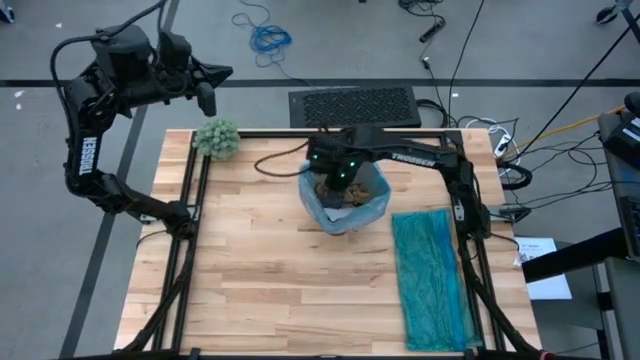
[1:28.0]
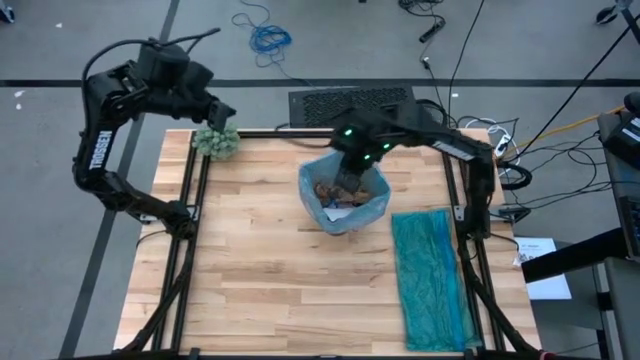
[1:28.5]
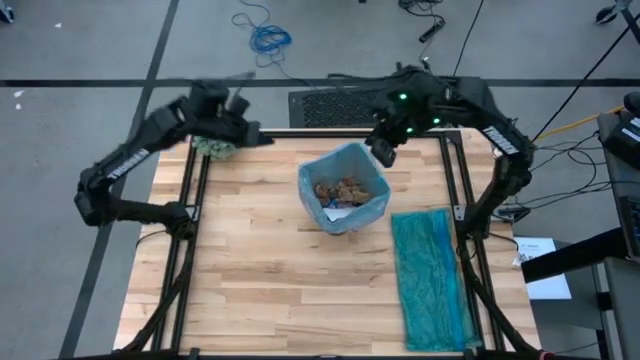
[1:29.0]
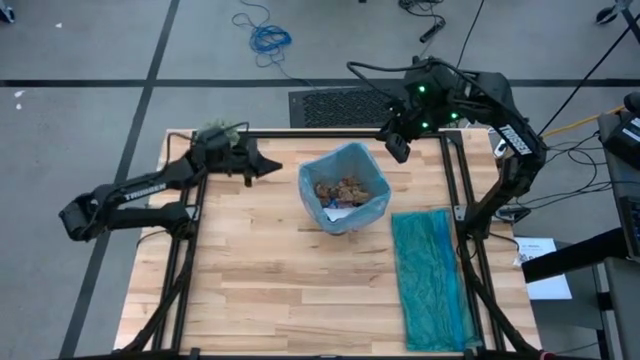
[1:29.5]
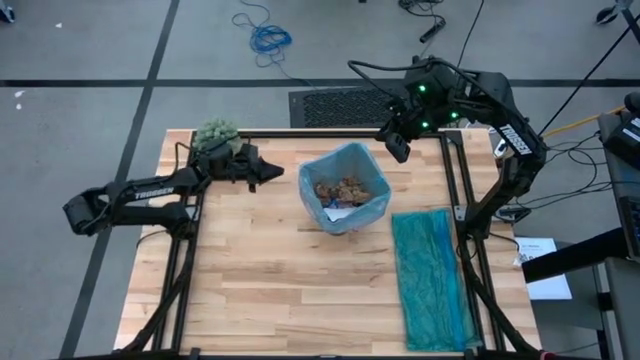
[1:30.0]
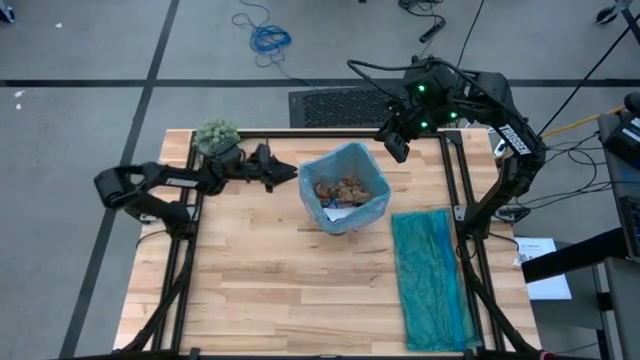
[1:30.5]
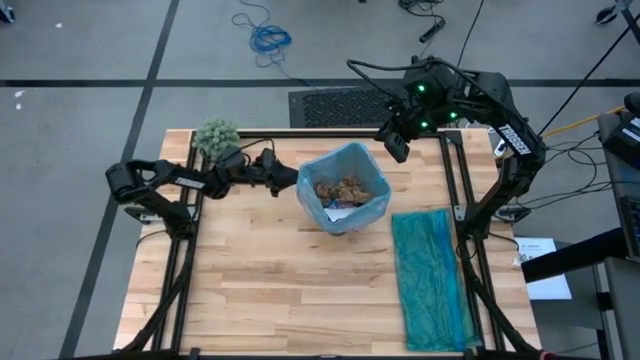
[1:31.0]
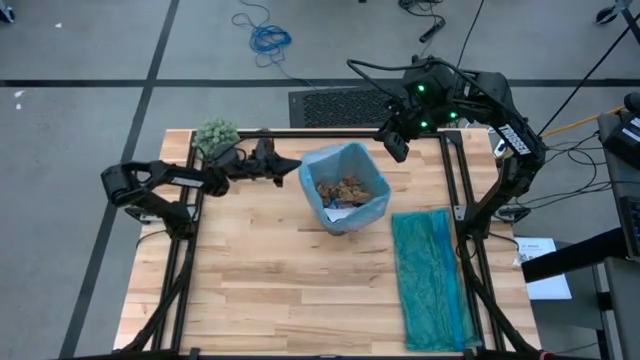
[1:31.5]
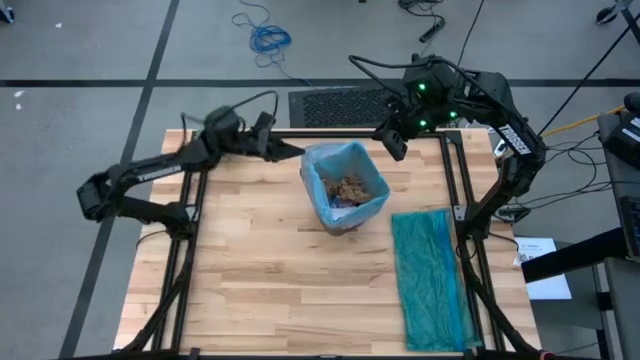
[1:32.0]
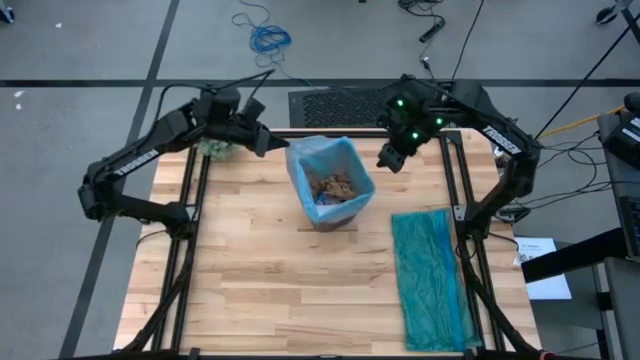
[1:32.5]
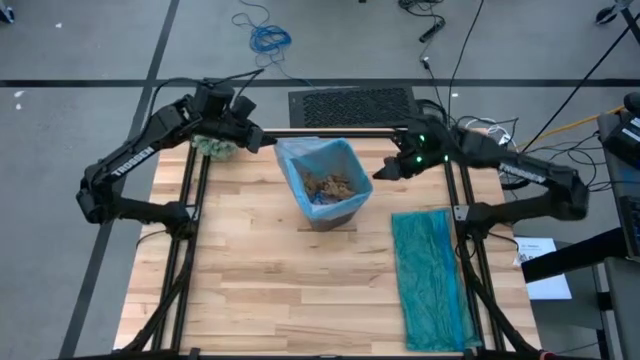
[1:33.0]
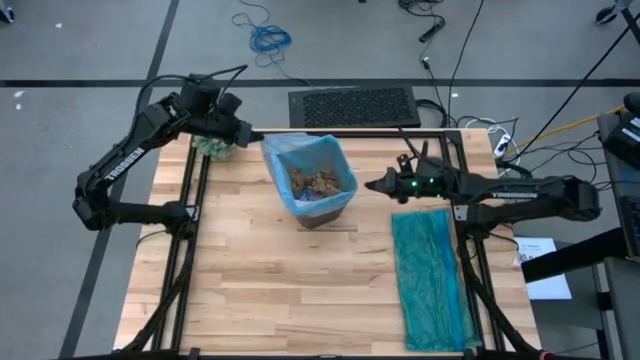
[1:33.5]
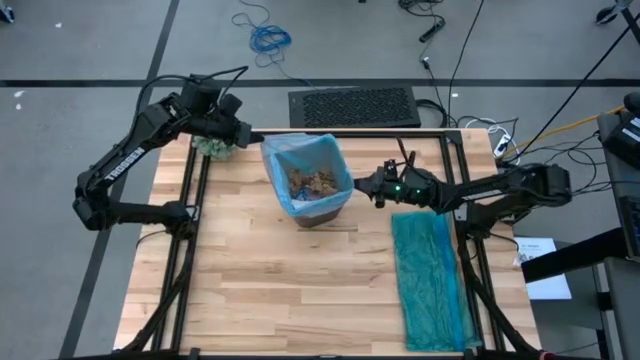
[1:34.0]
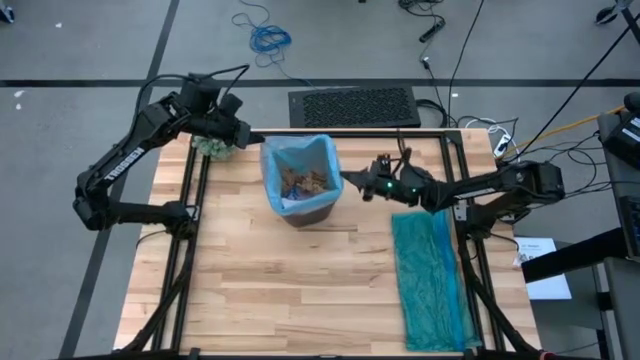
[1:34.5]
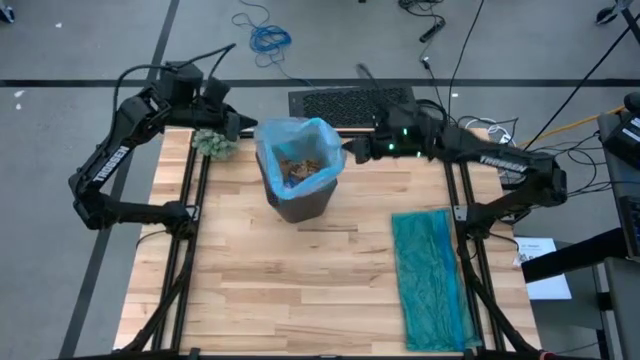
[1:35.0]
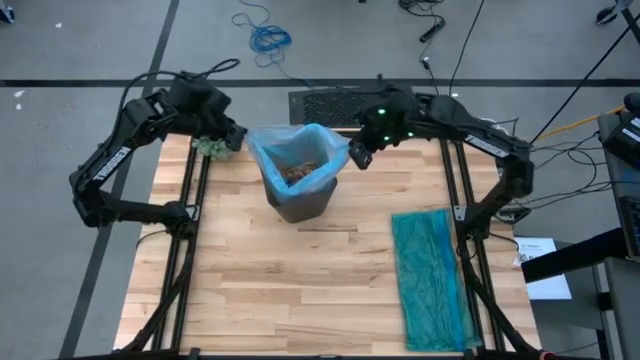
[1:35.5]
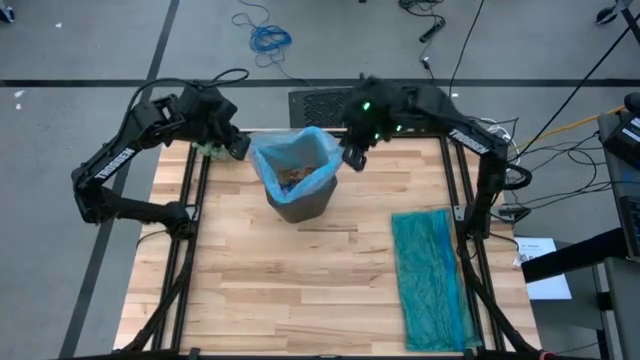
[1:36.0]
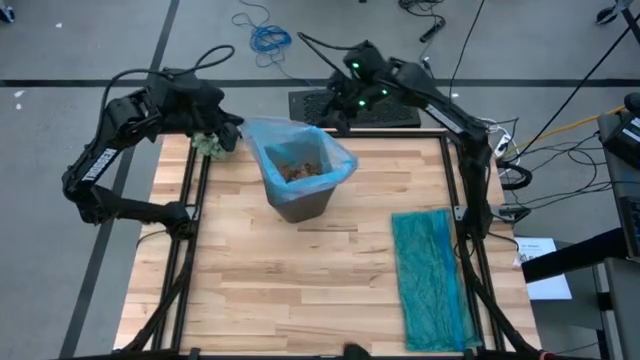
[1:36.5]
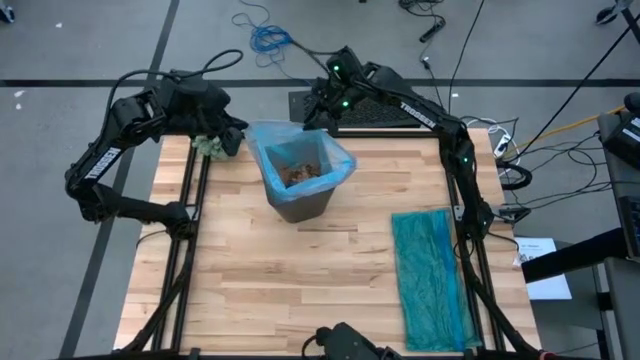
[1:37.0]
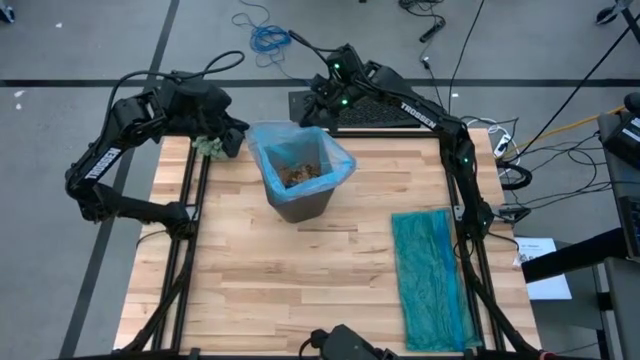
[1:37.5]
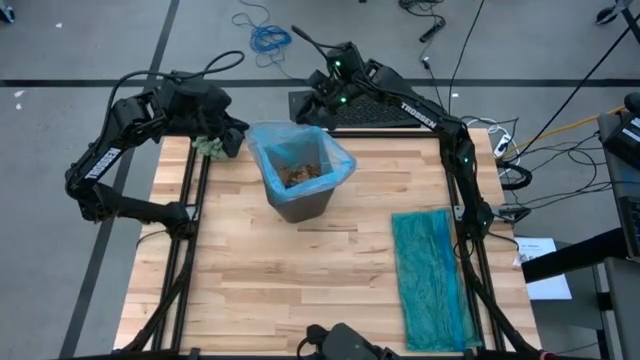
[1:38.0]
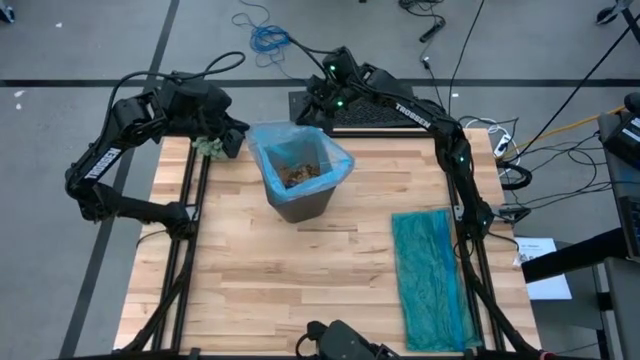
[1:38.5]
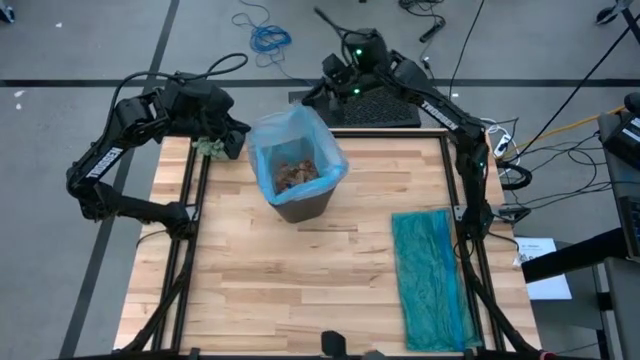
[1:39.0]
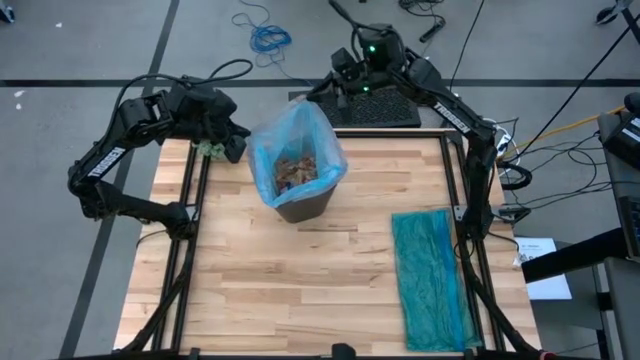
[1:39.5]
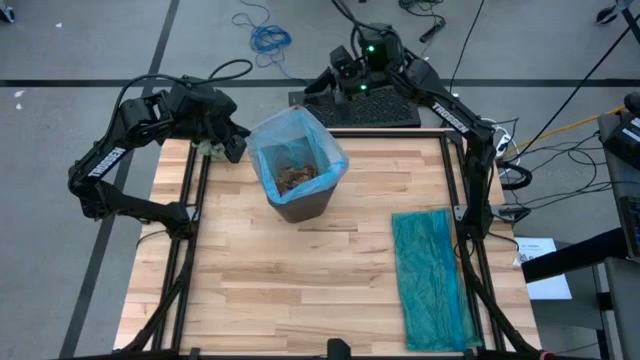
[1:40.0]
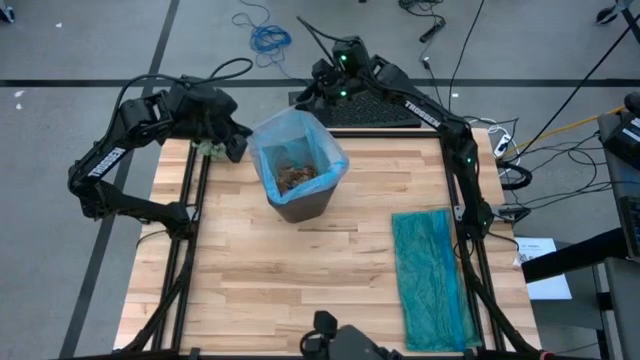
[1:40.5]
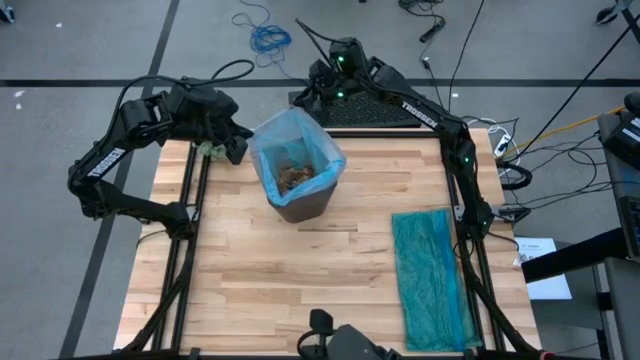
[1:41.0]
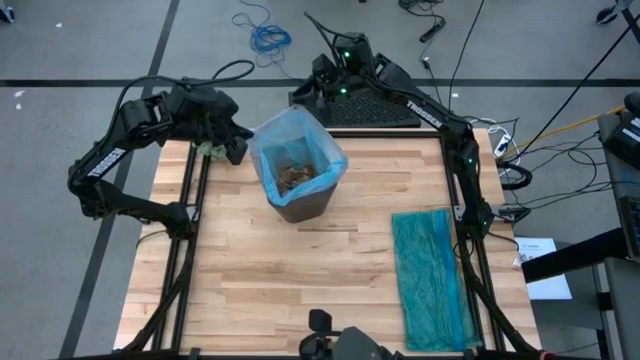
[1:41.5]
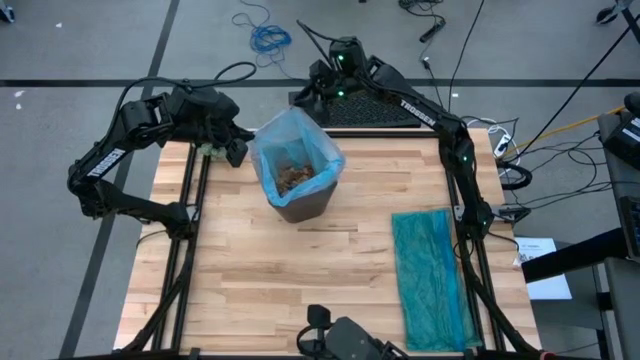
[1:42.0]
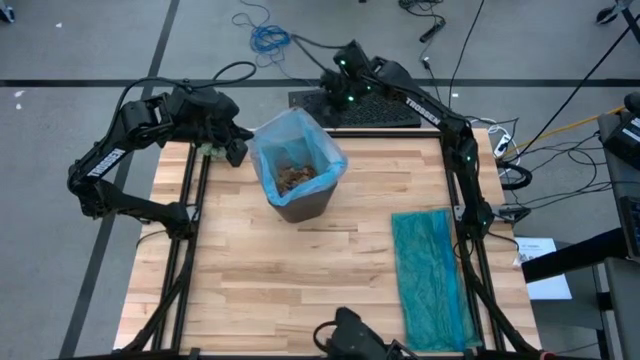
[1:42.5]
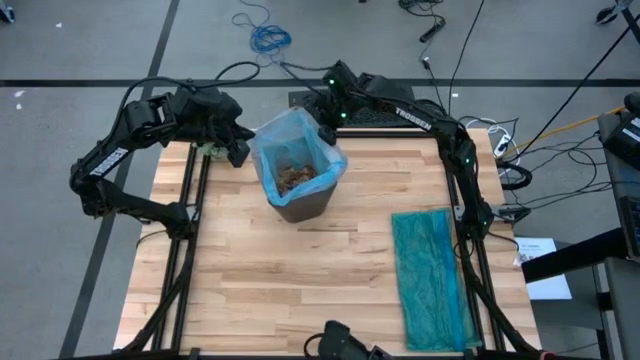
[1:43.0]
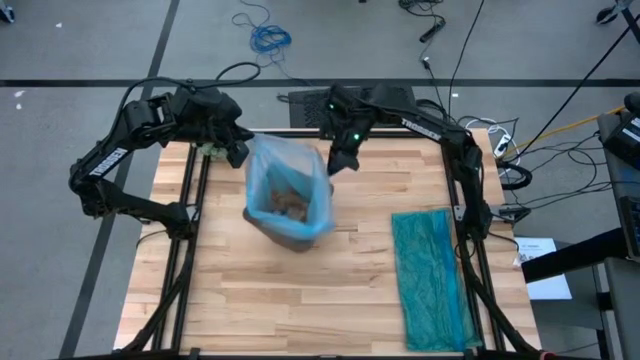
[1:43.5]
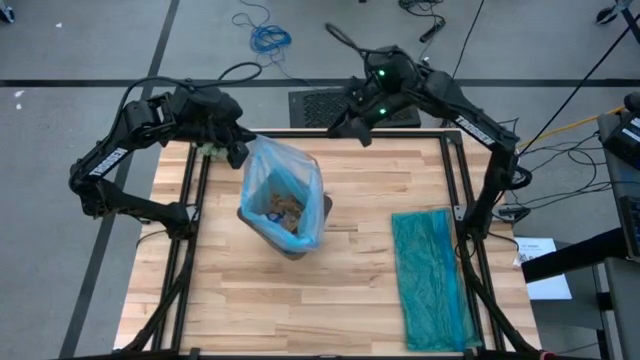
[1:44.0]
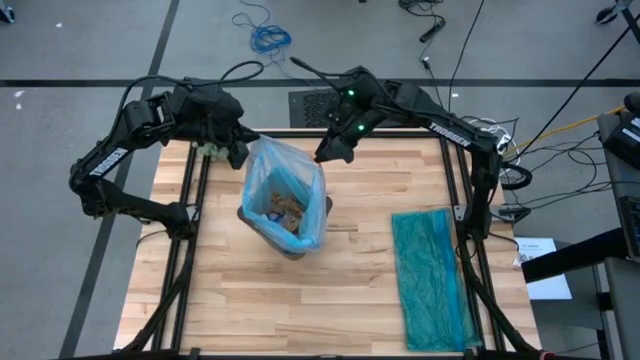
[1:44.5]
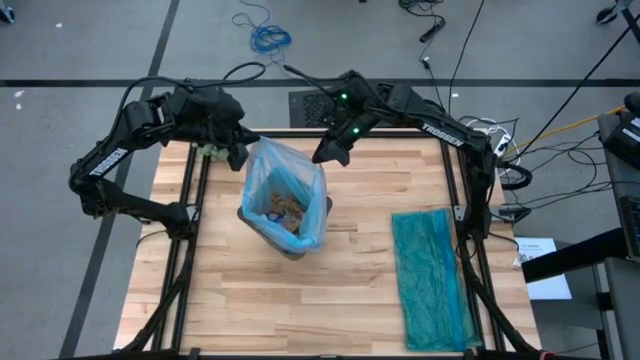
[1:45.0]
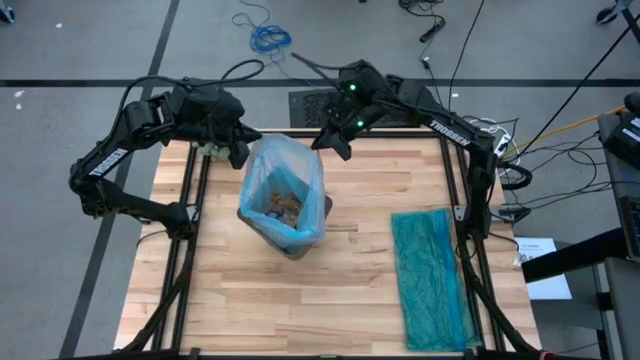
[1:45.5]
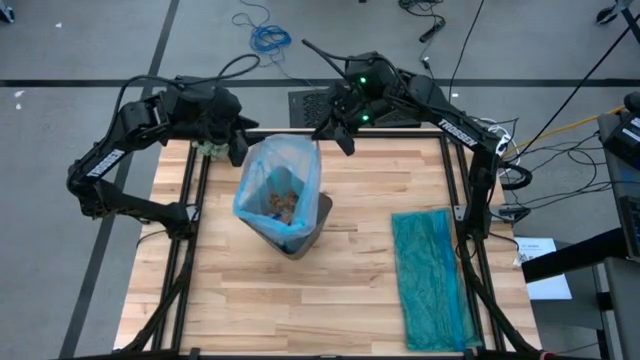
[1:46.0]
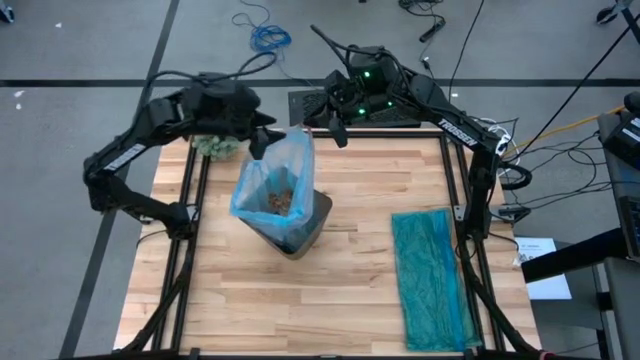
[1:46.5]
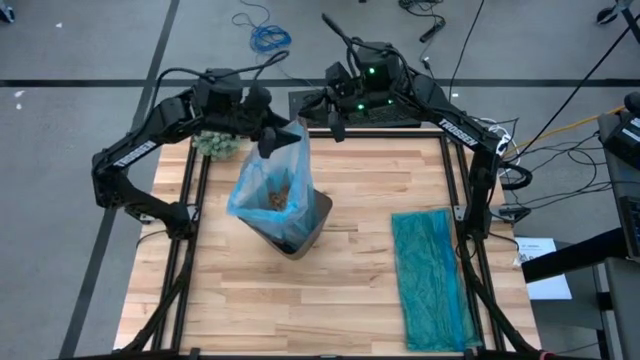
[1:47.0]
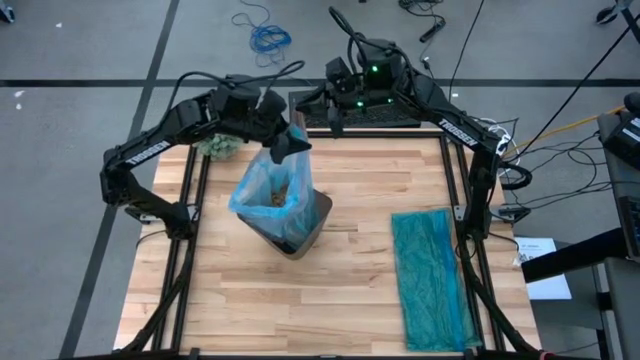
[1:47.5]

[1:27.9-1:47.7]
Task: place trash/remove bag and relplace
Close the blue trash bag
